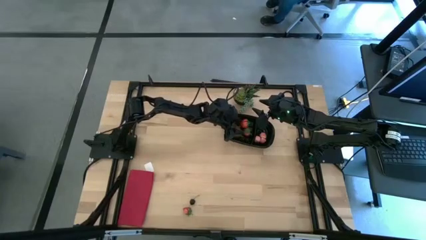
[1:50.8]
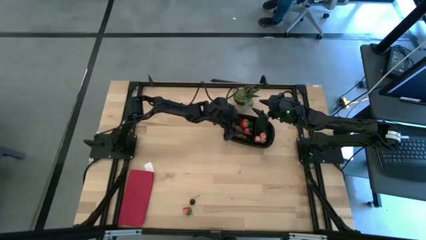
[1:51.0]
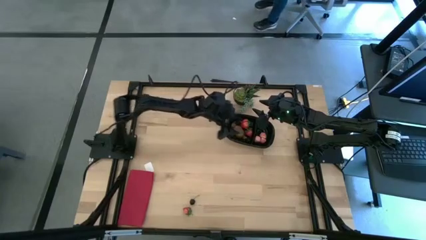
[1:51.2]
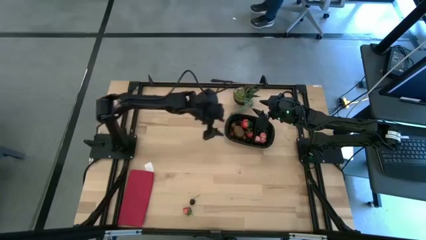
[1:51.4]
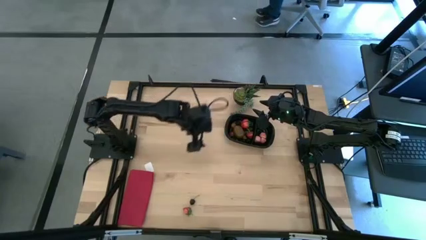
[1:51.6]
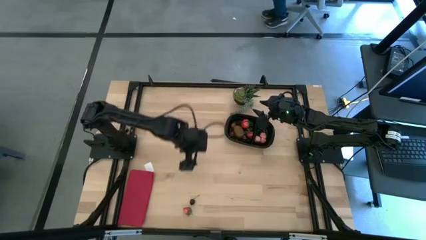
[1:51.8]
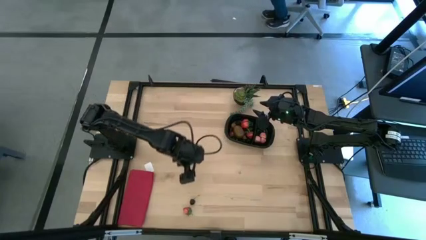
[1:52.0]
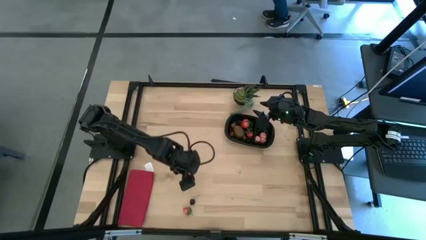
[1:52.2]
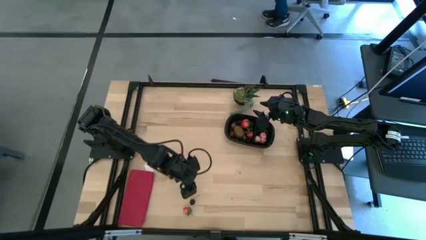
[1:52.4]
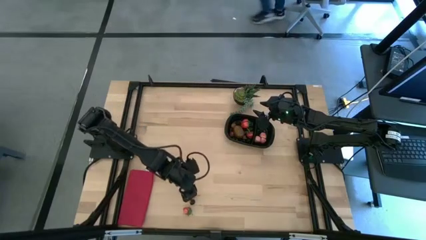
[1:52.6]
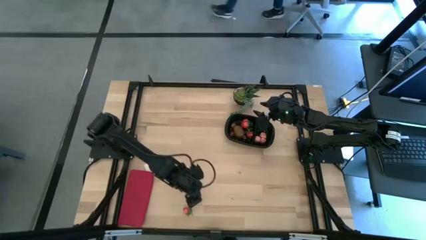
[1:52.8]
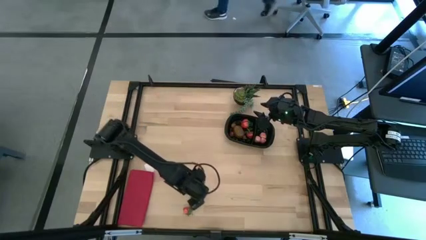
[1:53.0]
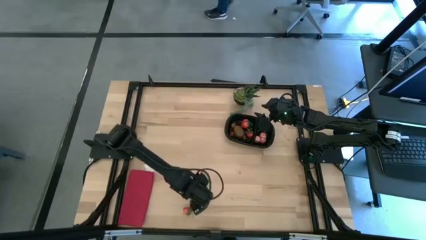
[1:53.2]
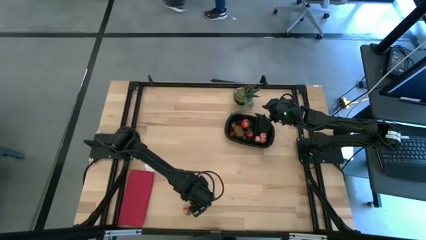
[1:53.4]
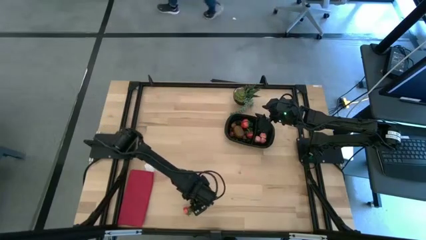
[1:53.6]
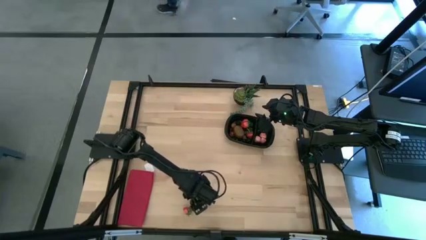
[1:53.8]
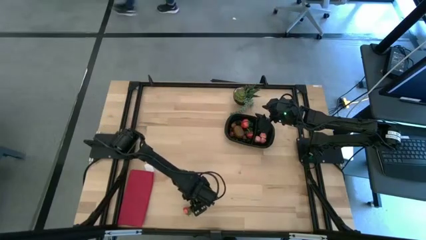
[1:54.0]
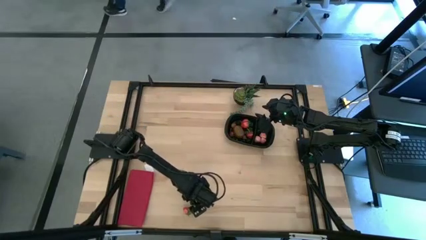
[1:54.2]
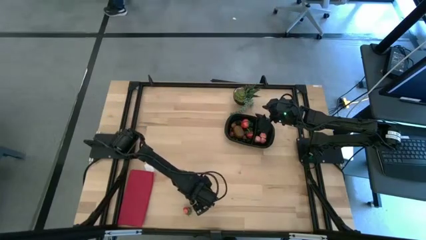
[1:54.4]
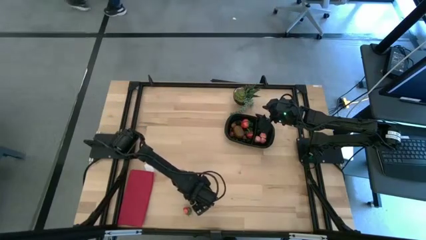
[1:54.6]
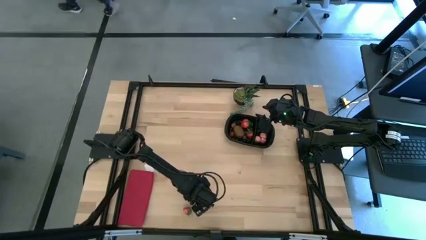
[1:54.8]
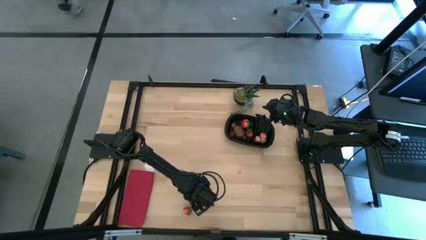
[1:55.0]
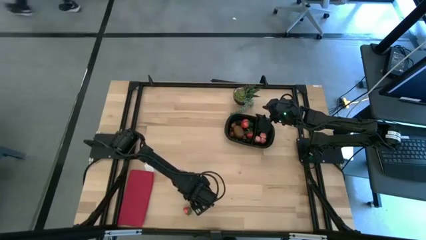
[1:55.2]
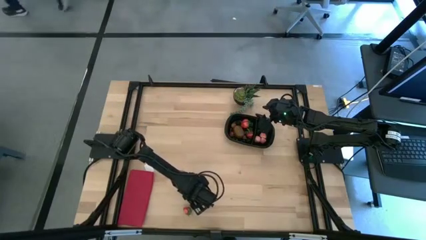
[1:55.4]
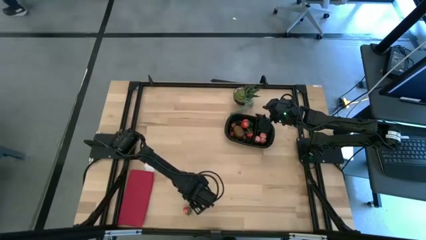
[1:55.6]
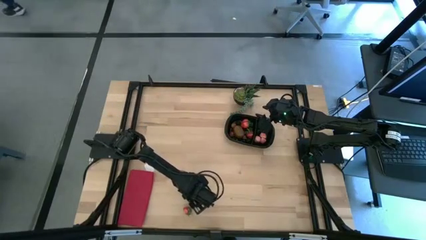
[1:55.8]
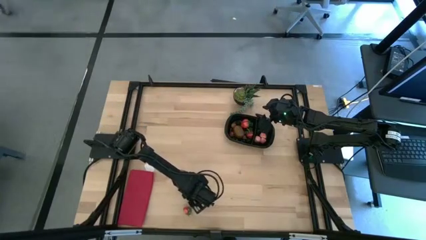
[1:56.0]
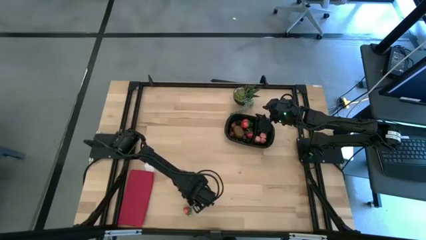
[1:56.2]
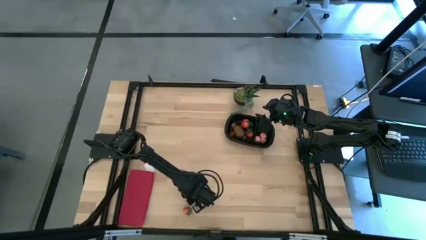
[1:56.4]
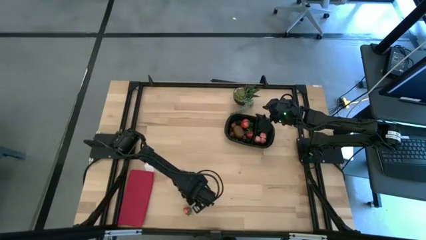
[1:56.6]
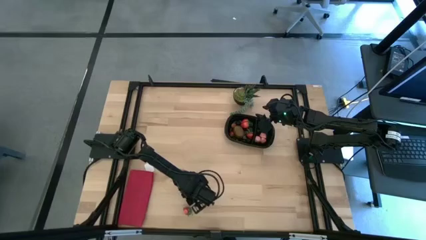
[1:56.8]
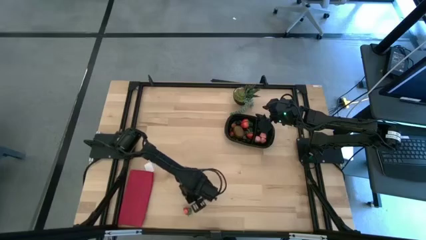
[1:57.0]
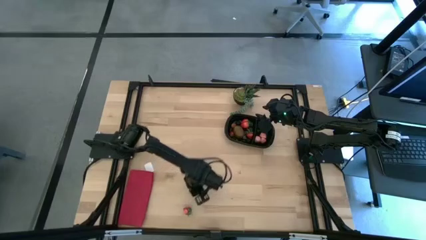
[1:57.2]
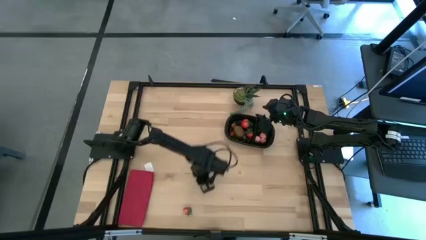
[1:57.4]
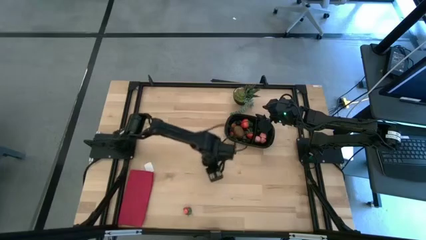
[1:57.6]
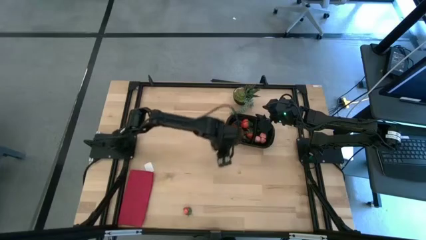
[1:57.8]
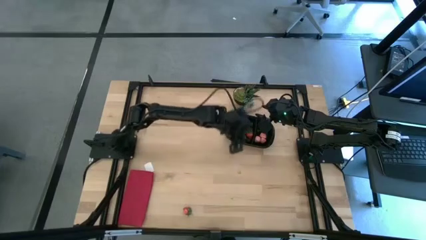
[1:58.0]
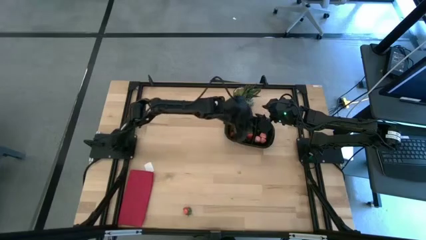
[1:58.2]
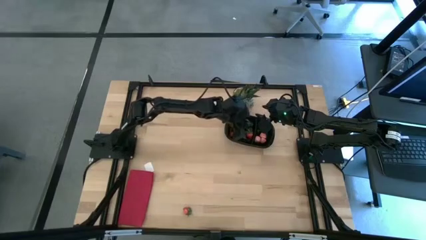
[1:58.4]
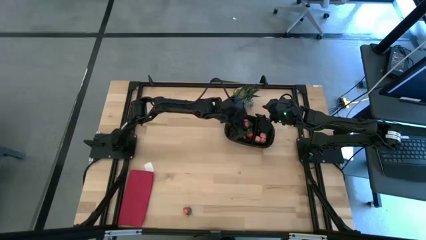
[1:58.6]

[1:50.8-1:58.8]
Task: Pick and placing Produce into tupperware
Put the black cherry into the of the black bin

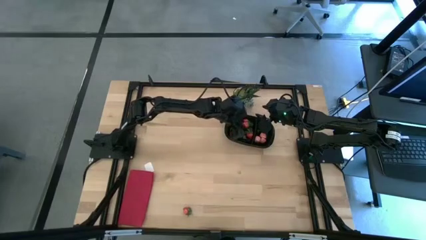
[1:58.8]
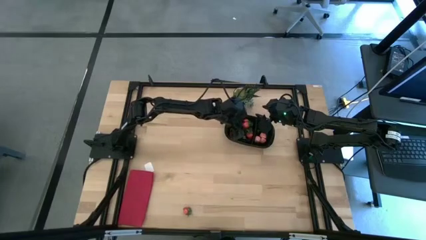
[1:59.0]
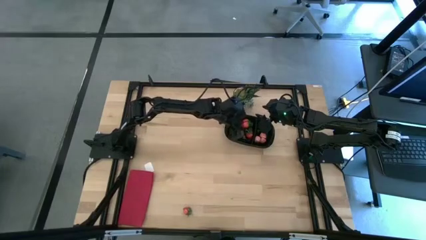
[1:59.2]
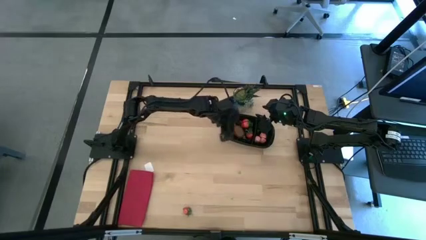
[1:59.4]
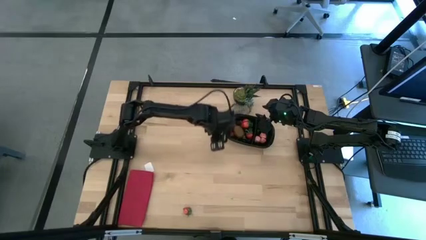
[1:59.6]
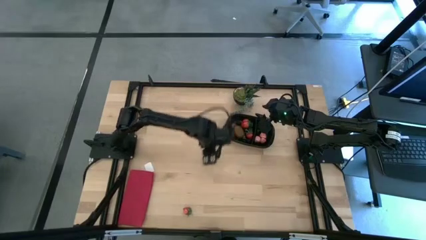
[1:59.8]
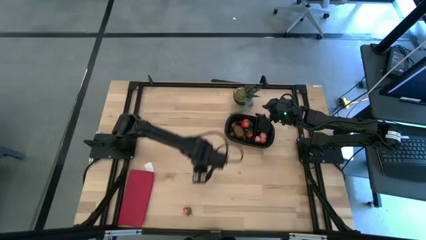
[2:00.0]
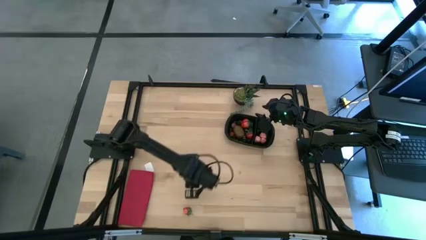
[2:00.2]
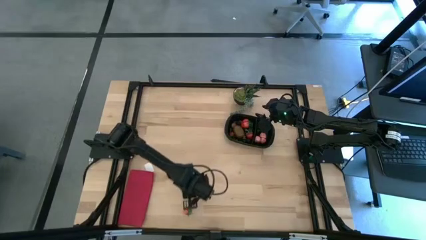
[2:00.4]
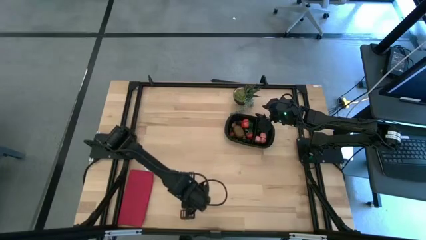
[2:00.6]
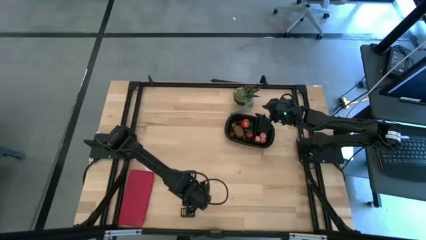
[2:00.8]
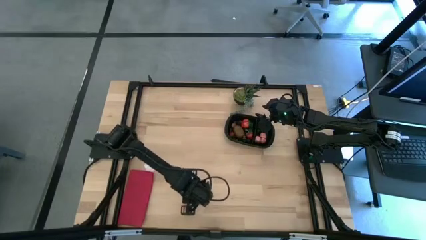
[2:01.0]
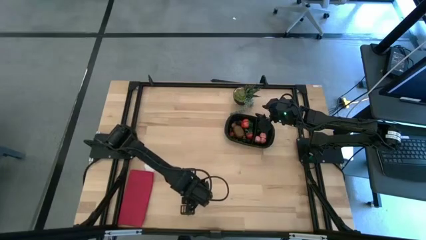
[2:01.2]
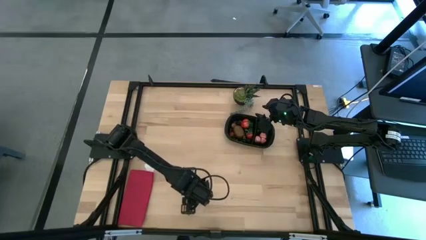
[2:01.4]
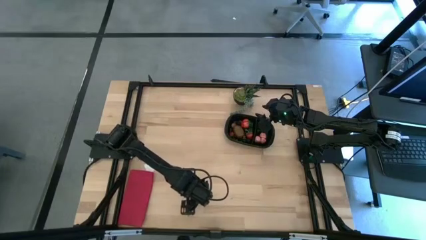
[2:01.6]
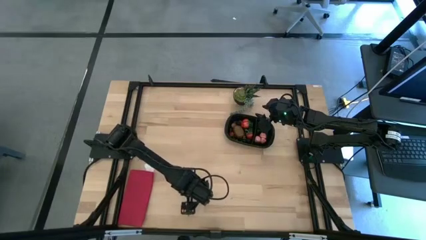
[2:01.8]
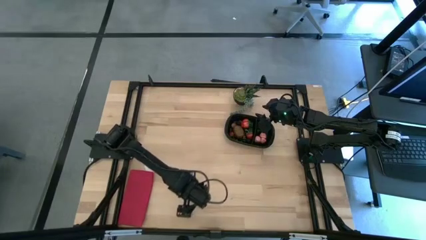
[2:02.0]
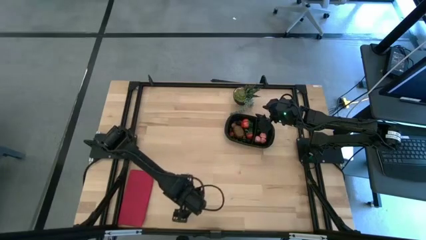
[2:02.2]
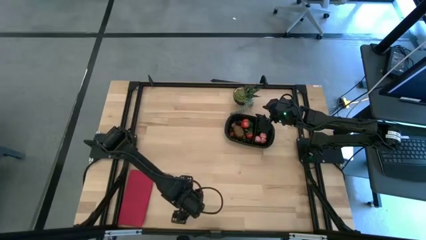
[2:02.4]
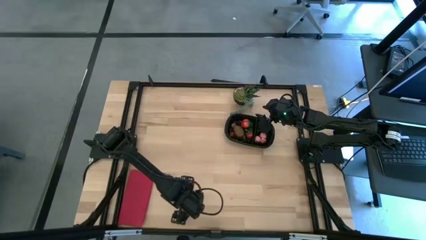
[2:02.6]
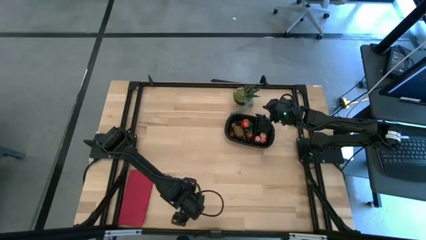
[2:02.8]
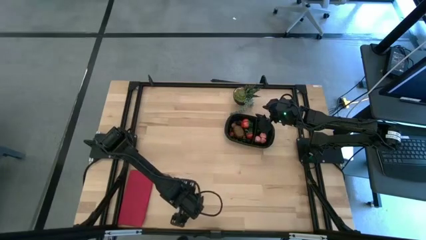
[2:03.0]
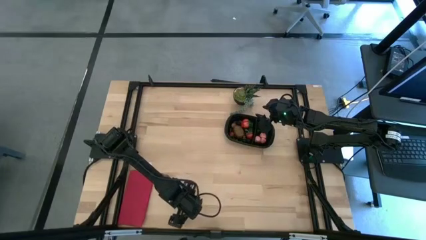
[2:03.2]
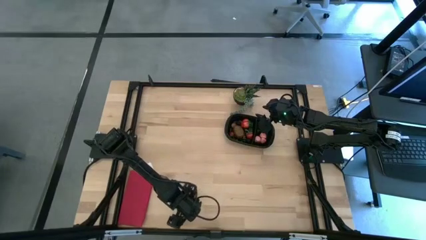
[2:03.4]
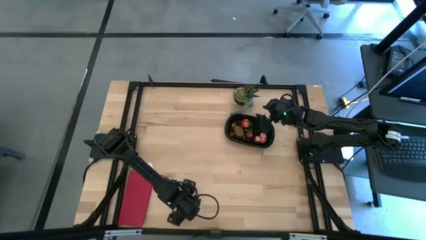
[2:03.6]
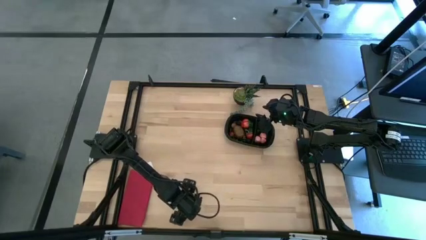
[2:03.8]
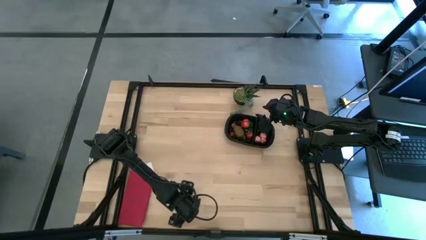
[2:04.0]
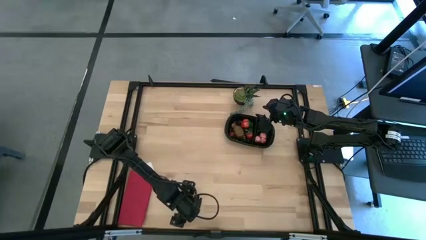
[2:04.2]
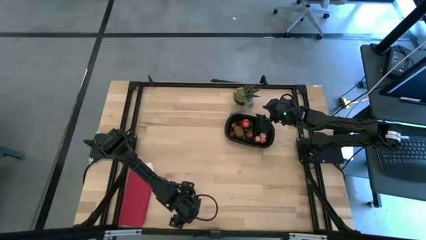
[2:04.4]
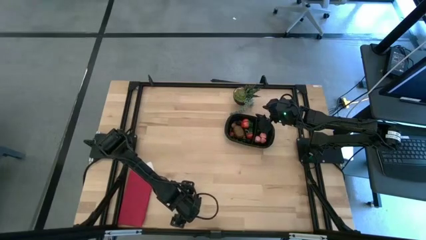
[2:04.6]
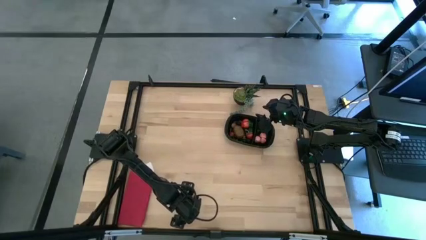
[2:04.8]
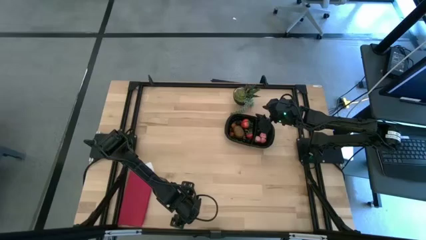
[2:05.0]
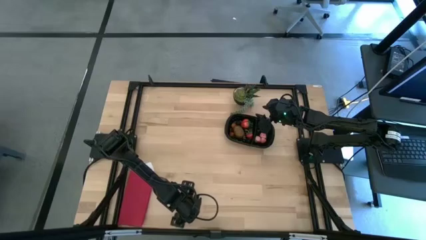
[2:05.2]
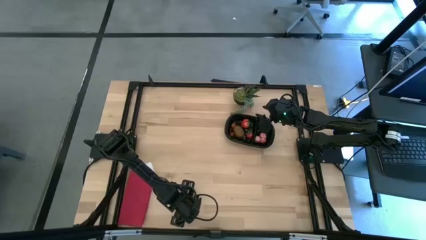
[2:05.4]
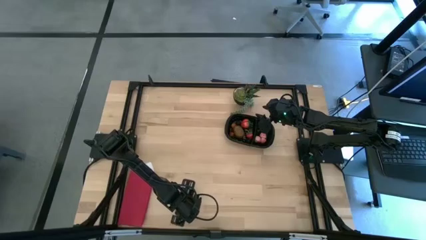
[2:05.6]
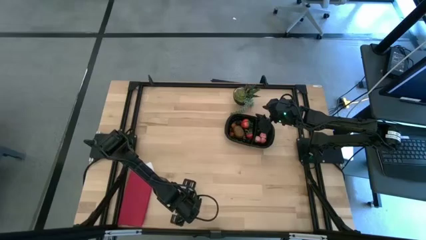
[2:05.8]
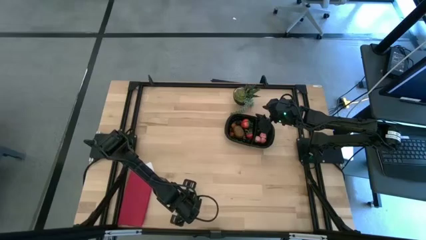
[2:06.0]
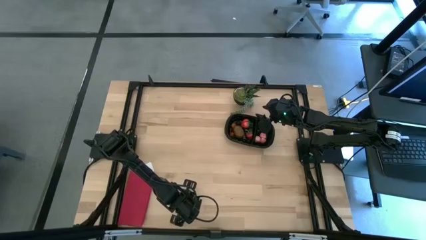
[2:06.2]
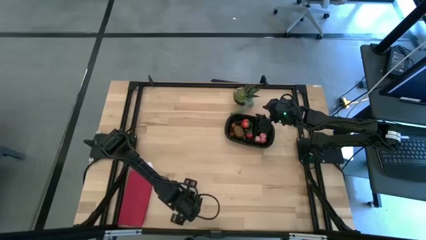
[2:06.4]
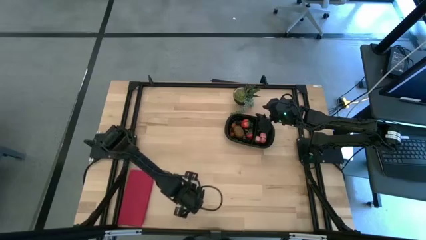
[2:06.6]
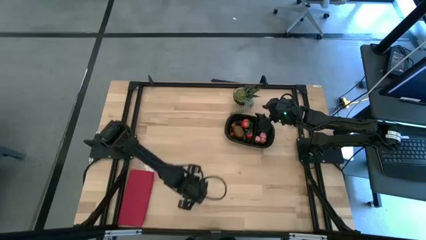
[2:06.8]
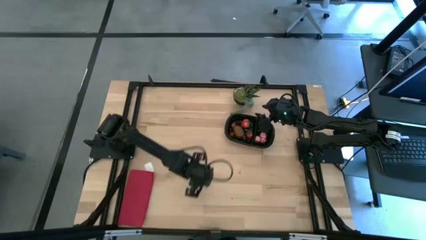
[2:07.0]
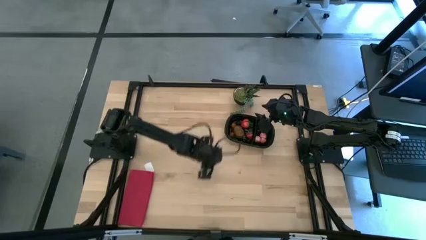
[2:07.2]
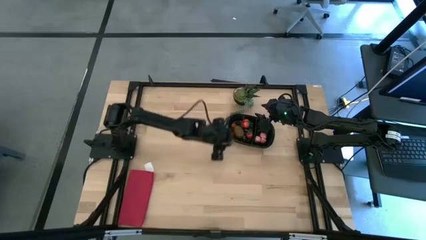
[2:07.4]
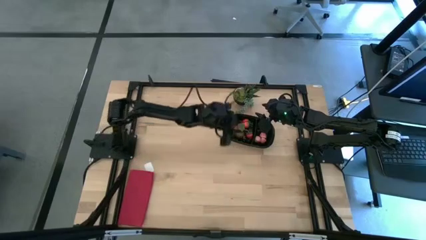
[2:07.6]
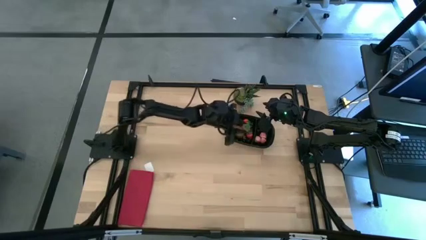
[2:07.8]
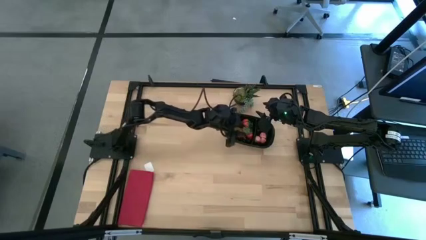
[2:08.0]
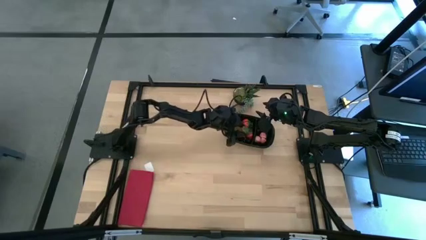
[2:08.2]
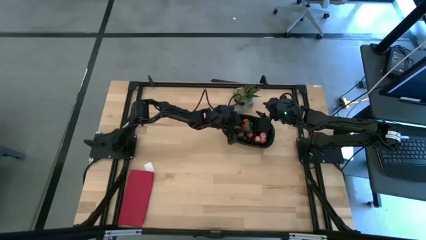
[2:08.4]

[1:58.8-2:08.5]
Put the red strawberry into the of the black bin
